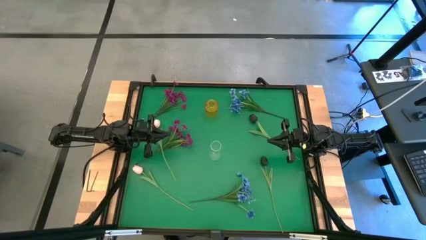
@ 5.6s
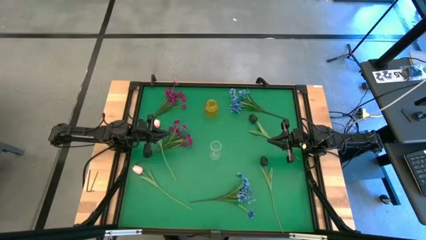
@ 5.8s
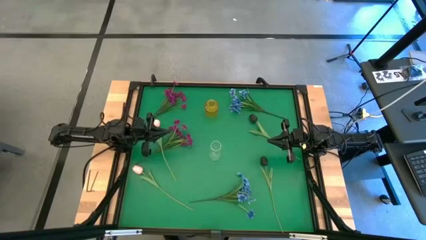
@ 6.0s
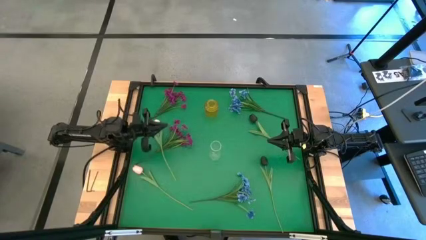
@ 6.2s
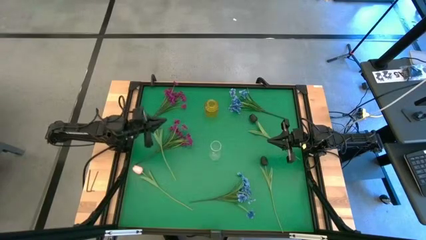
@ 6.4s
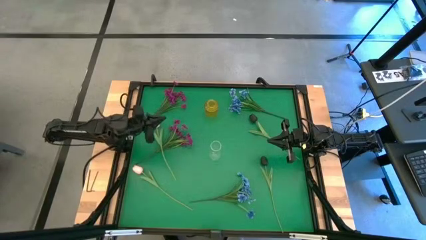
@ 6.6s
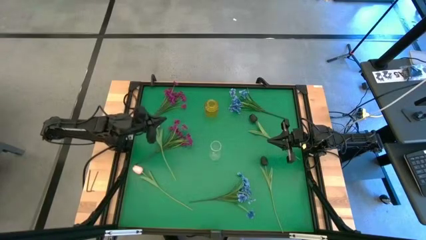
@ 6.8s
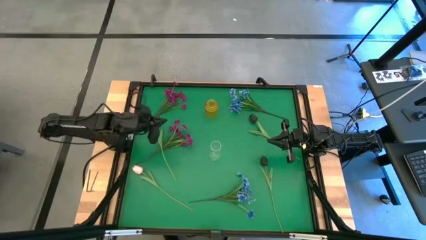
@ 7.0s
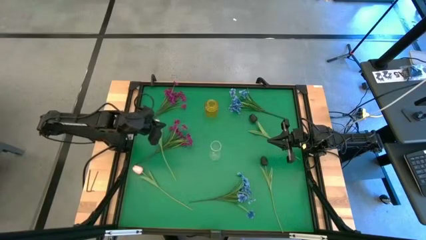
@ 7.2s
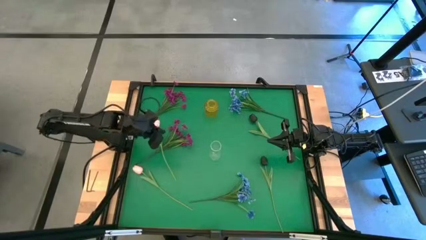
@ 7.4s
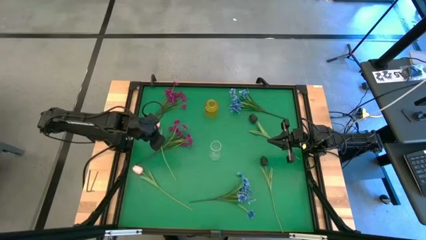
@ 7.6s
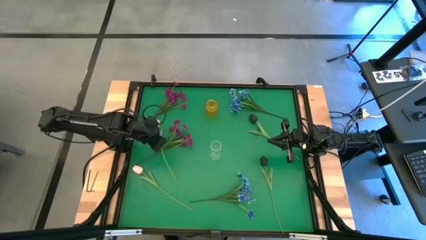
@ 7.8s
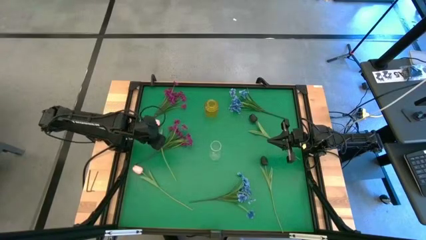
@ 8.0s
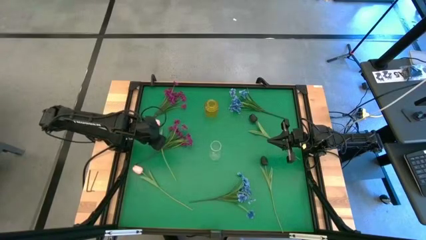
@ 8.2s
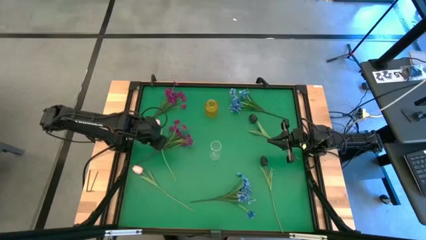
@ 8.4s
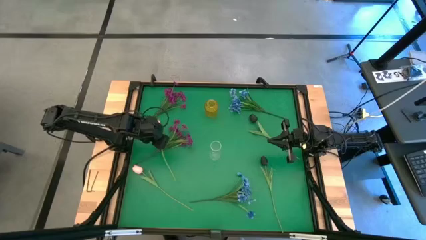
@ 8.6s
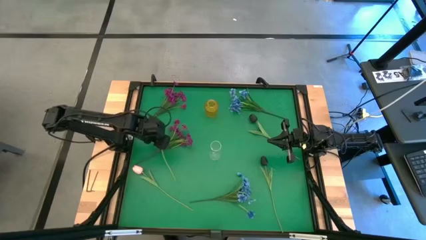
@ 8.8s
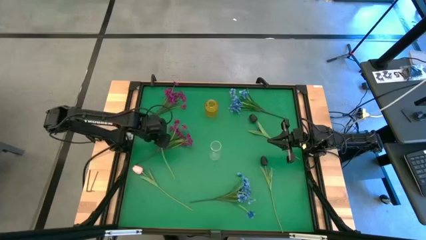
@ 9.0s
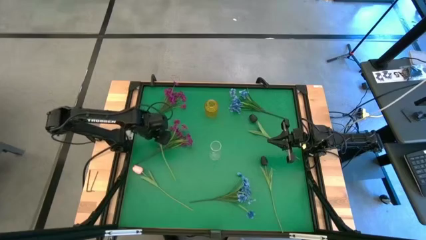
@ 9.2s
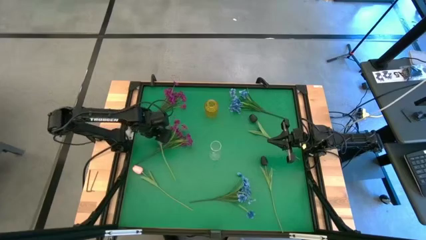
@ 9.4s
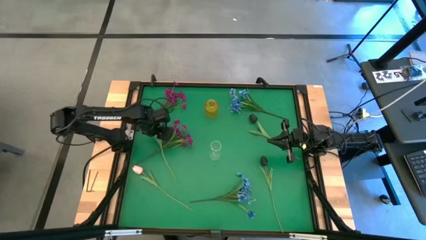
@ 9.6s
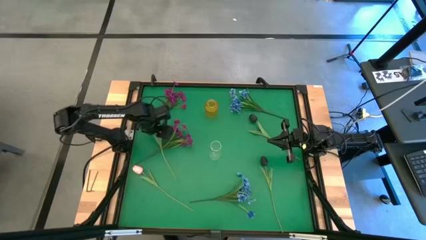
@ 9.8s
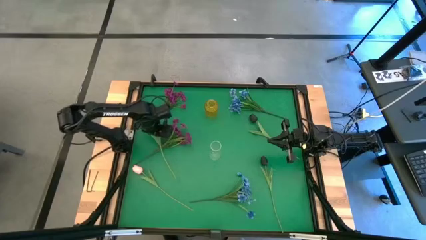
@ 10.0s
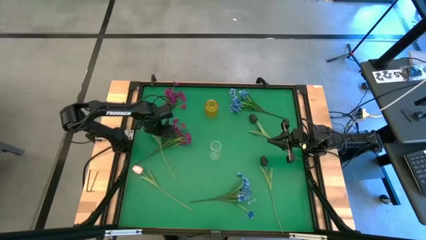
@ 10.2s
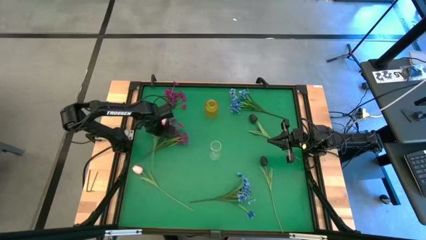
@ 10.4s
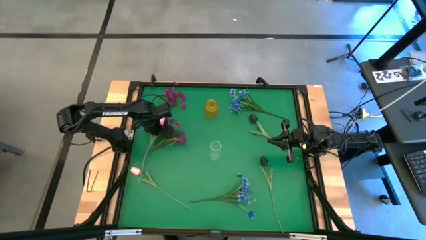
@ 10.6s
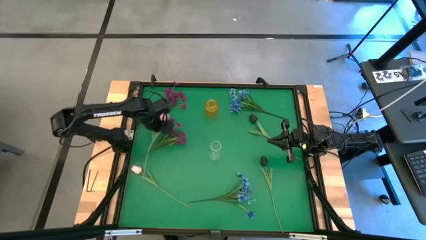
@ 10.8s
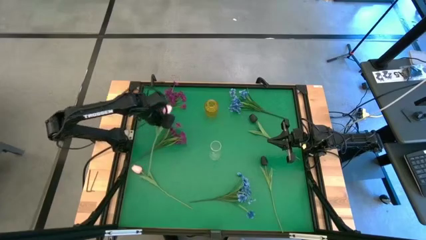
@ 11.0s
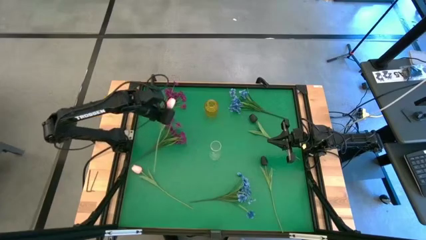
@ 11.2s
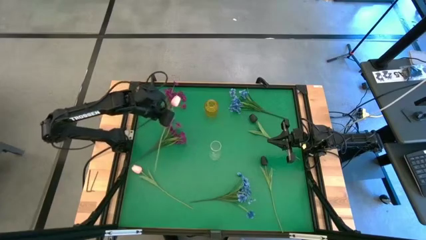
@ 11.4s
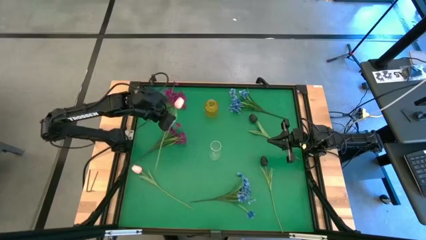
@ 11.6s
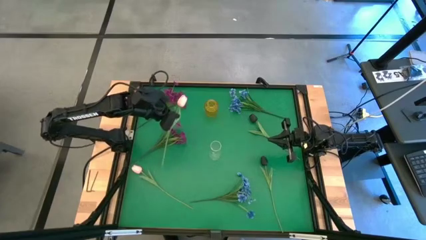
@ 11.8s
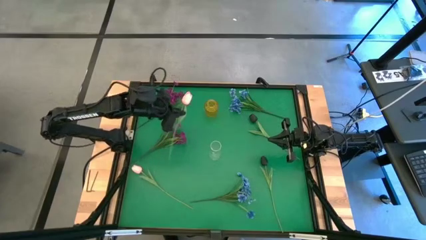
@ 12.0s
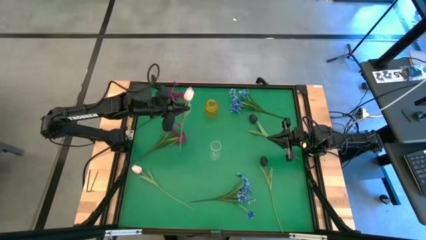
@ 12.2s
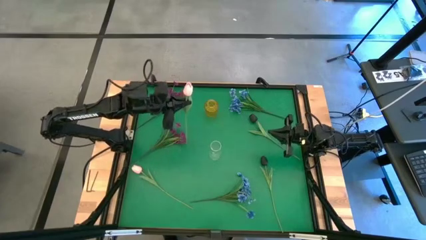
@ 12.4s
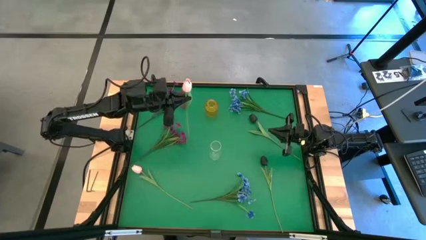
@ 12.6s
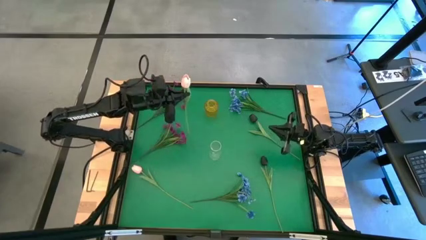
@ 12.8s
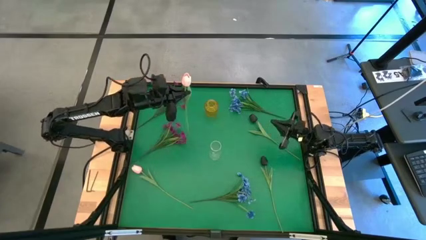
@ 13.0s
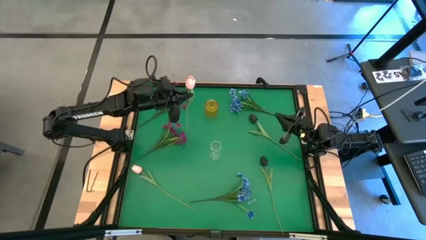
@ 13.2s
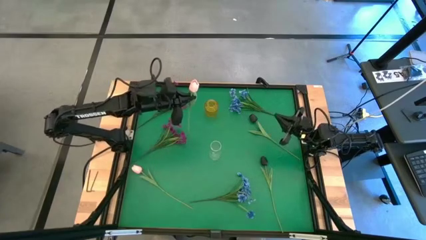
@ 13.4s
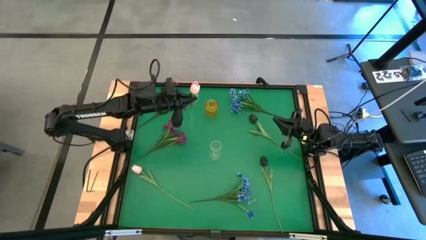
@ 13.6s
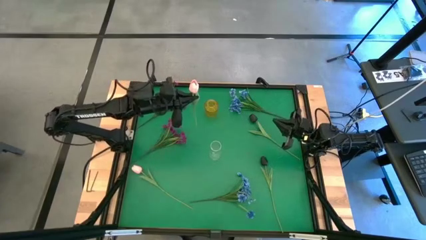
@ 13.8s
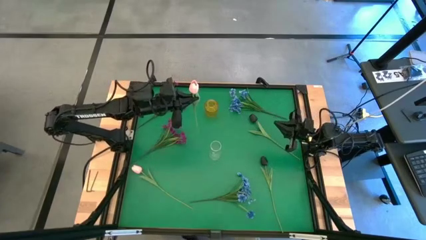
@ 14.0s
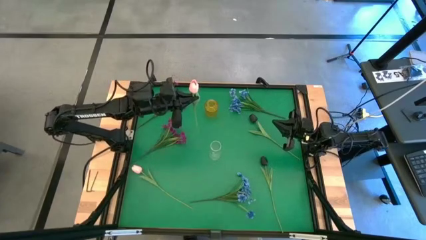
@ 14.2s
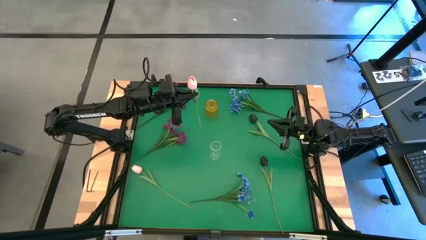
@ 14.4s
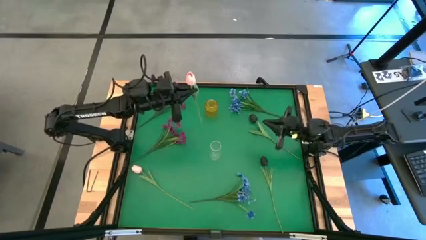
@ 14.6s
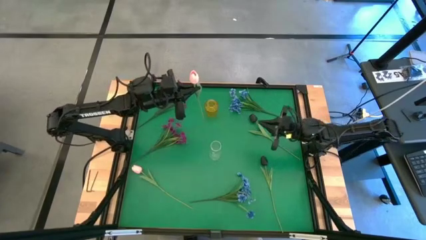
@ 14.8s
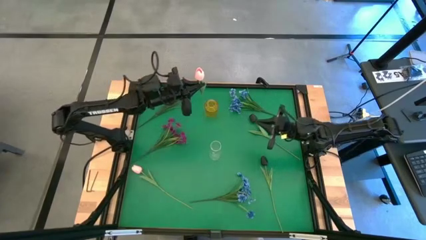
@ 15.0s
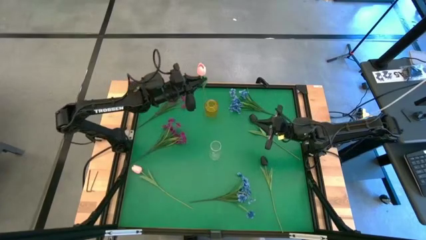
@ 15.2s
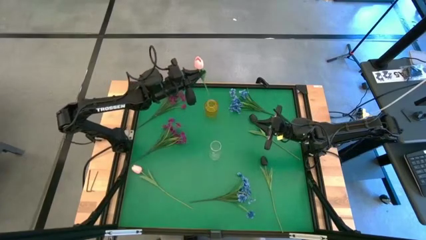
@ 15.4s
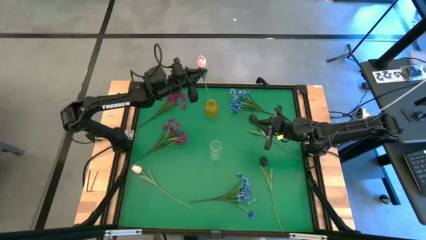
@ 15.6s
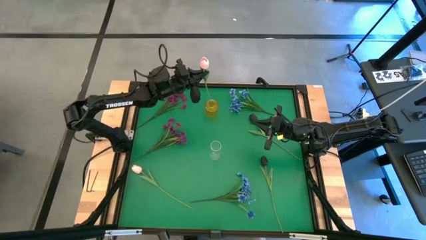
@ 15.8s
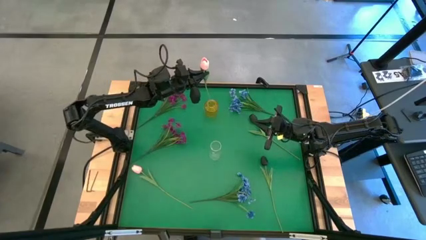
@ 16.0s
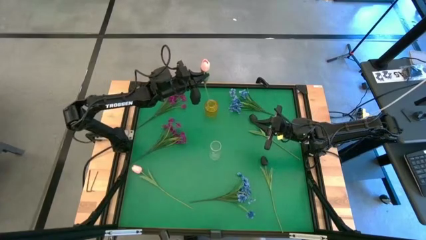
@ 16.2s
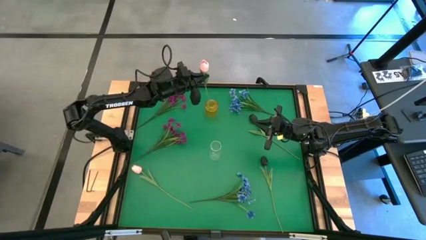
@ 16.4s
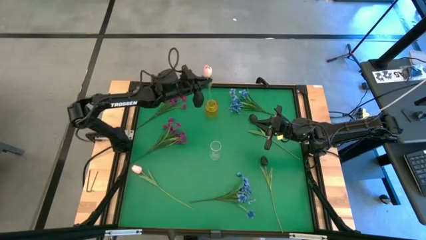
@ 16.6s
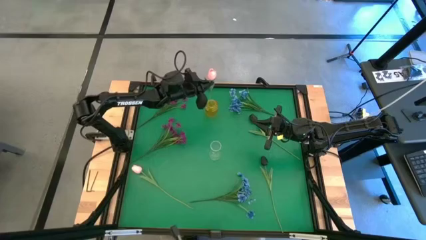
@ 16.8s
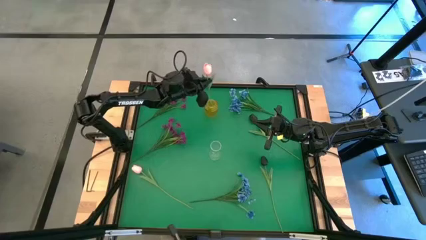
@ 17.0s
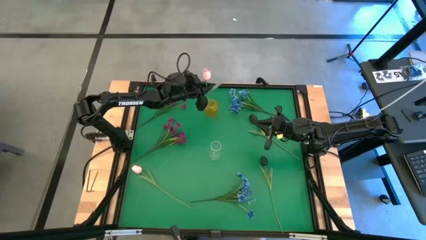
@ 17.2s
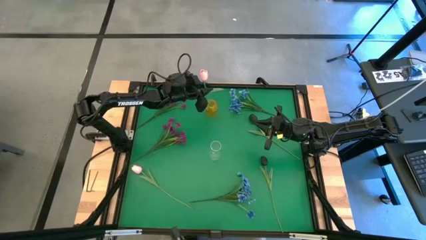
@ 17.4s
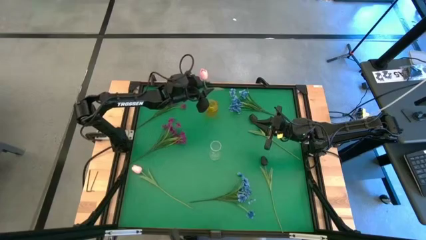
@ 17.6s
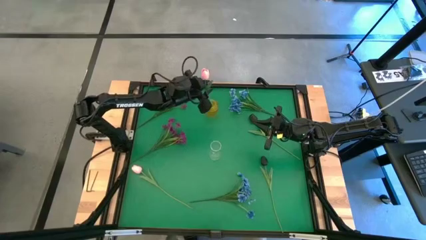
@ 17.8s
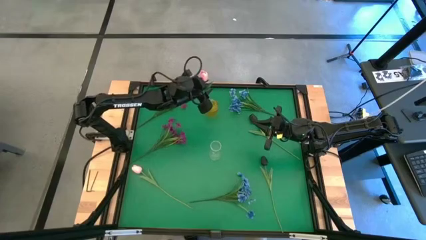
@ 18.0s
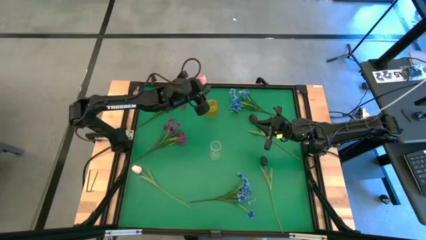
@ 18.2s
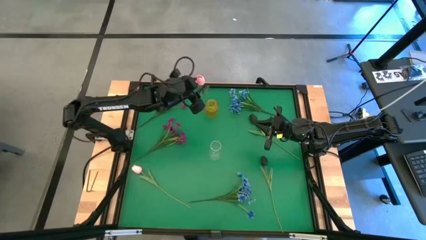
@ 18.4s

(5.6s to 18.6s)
Task: Sort flowers into vase by color
Put the top pink flower into the yellow vase
